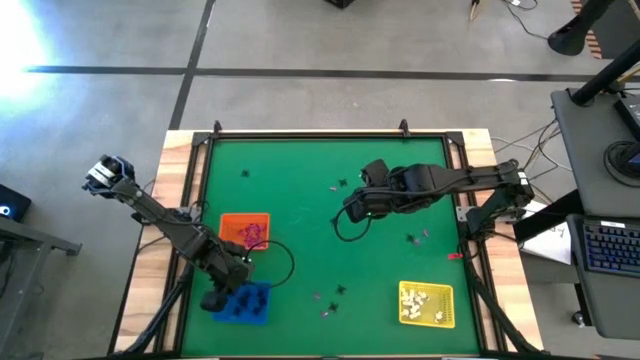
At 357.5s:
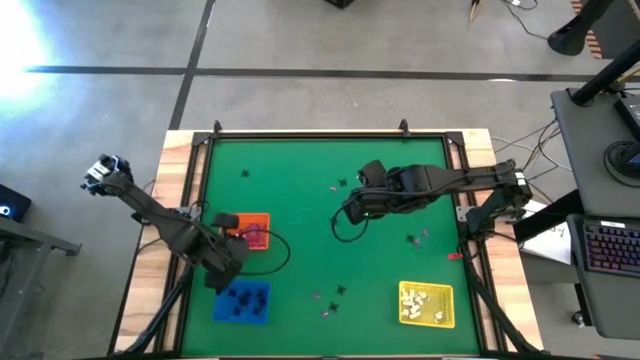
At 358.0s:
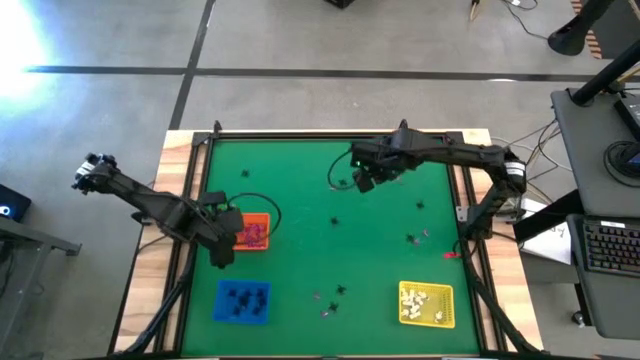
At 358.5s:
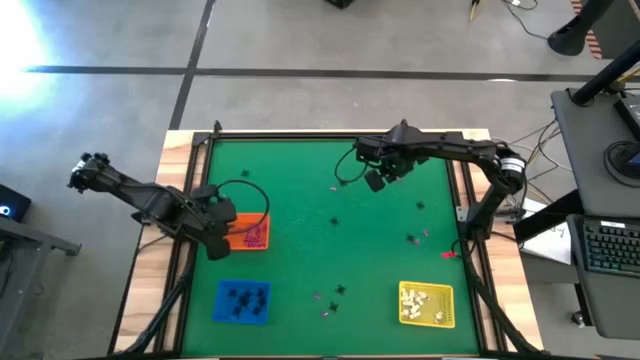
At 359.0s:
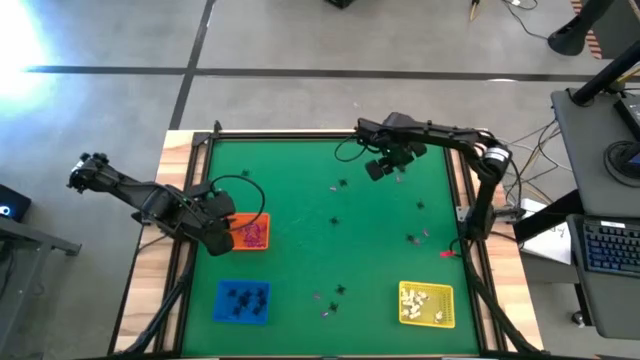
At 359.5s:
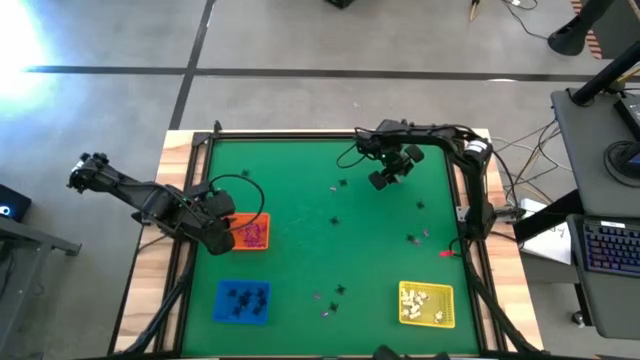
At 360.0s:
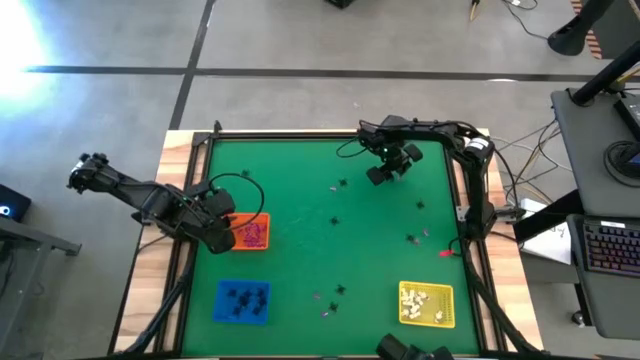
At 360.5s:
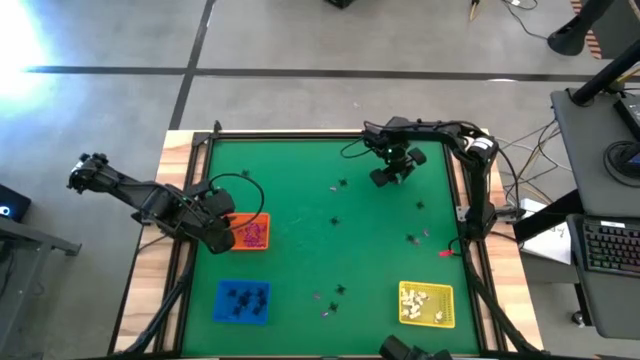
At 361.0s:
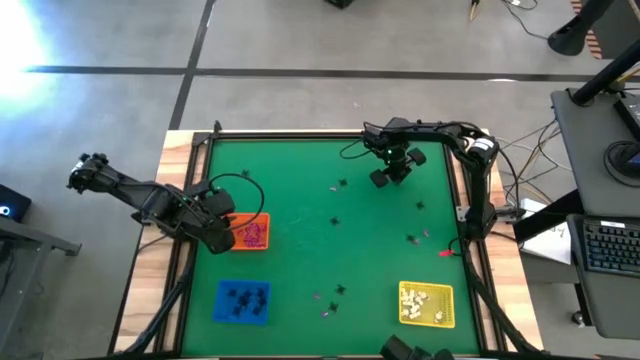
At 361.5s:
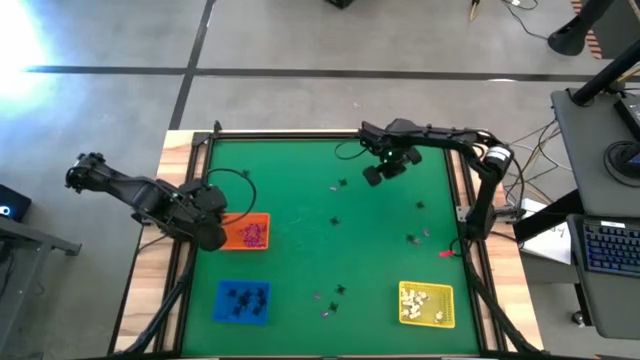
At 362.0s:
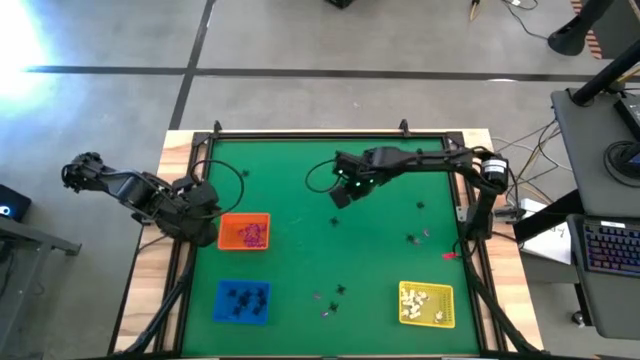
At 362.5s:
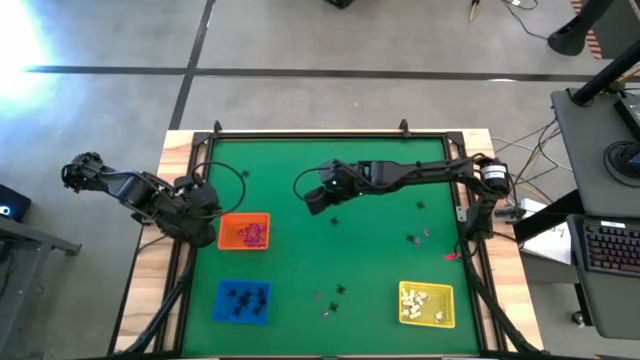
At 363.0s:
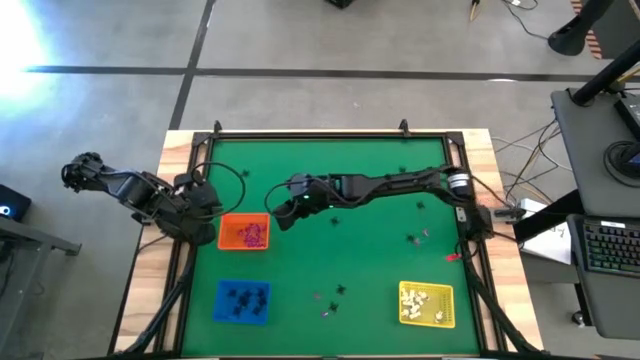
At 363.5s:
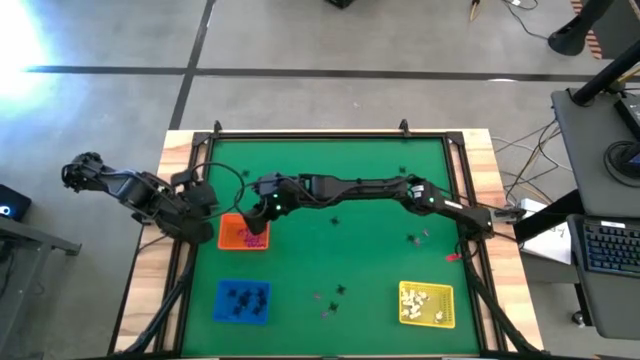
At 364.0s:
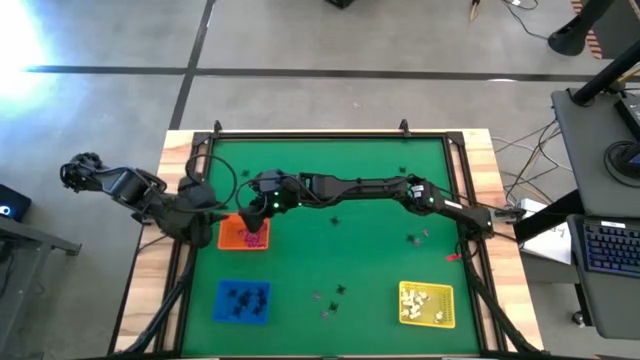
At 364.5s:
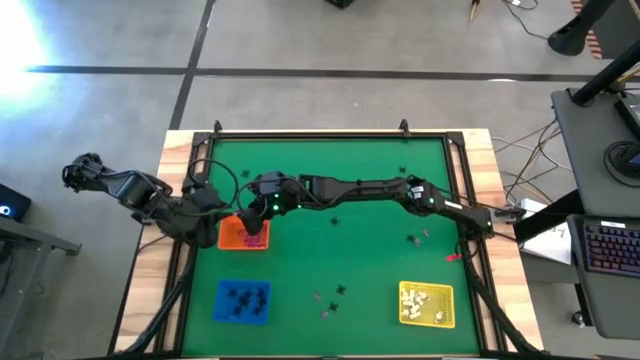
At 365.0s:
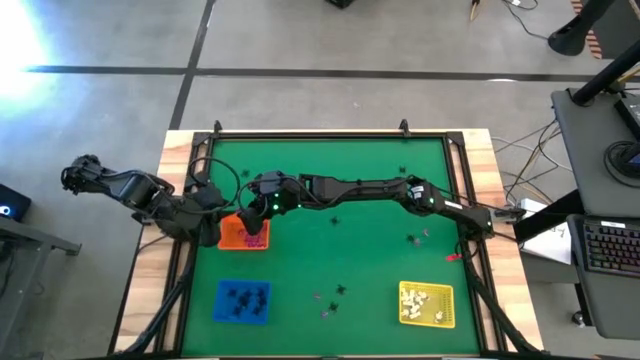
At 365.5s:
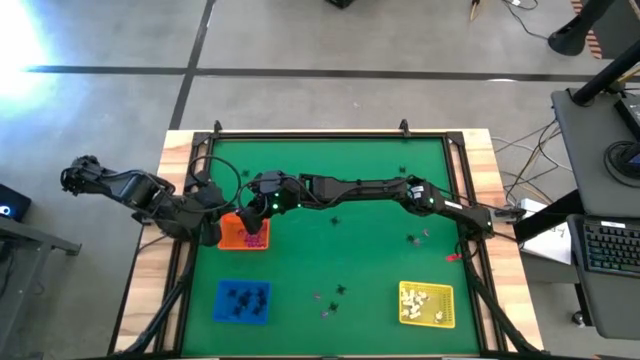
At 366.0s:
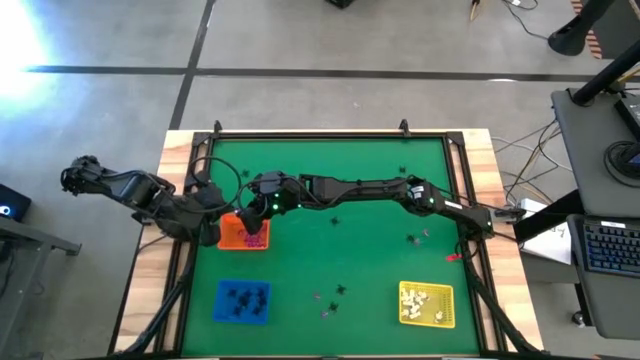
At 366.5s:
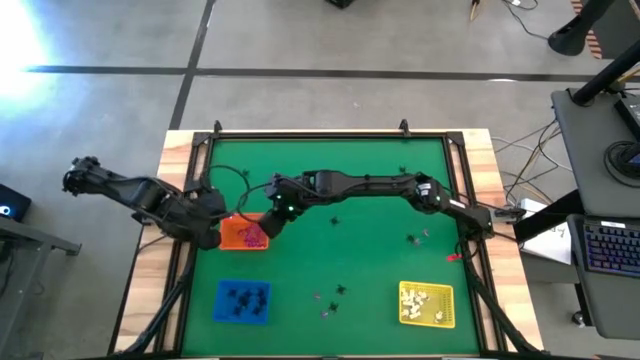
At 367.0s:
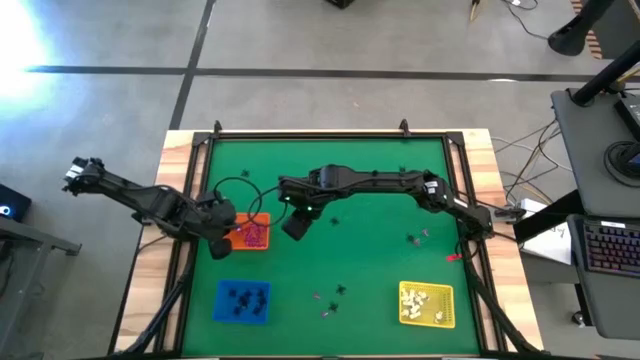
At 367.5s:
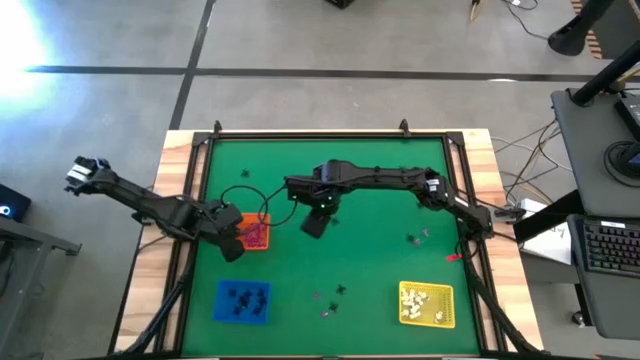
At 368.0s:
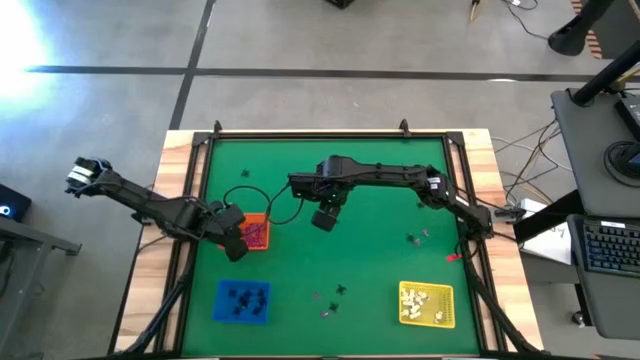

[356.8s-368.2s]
Task: Sort Halloween decoration
Put the violet witch hat toy into the orange bin

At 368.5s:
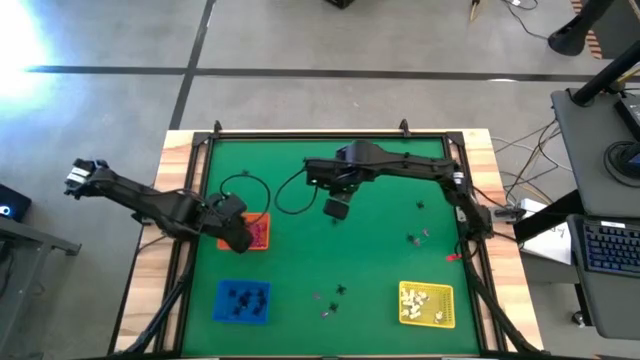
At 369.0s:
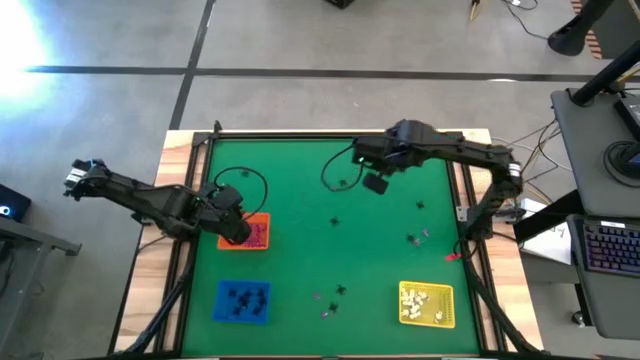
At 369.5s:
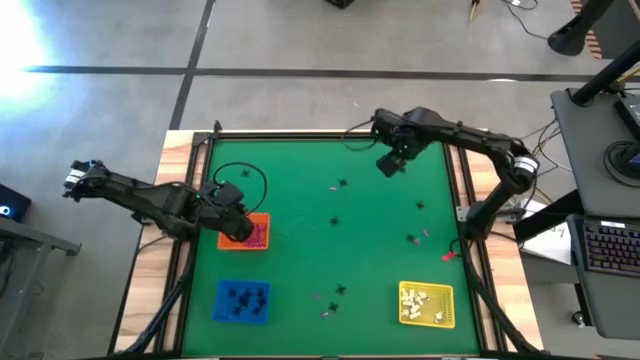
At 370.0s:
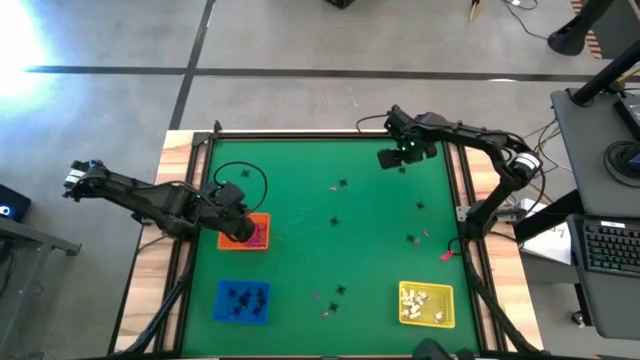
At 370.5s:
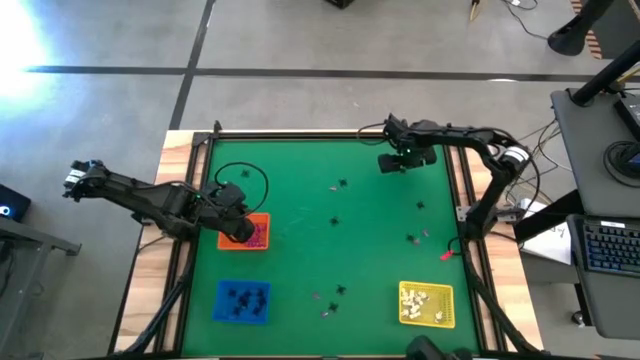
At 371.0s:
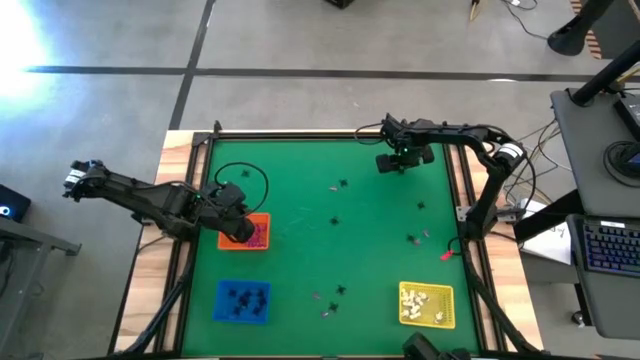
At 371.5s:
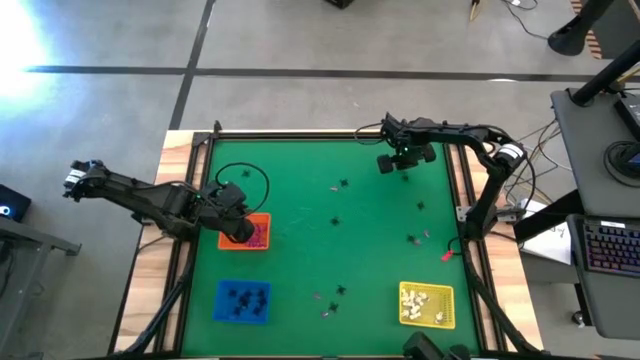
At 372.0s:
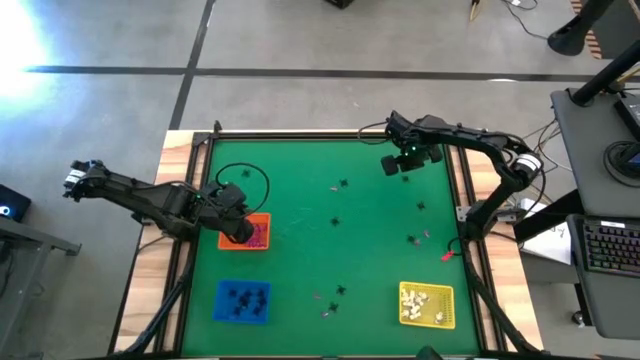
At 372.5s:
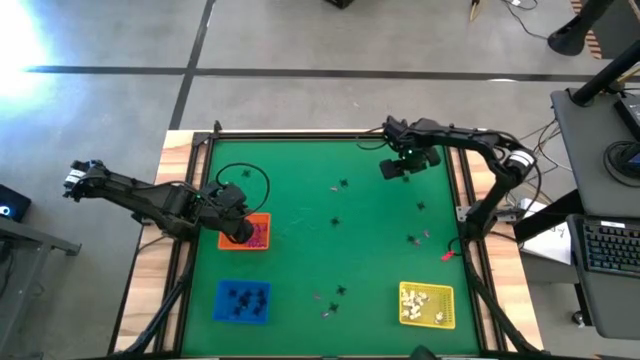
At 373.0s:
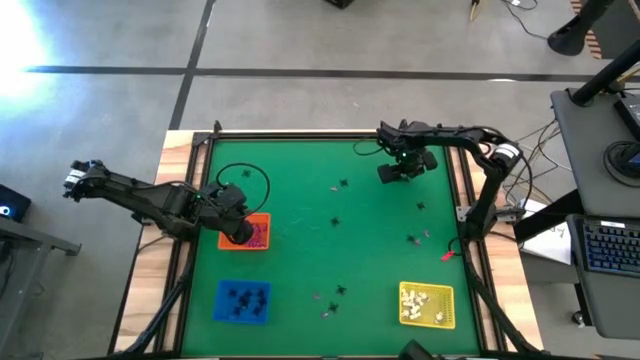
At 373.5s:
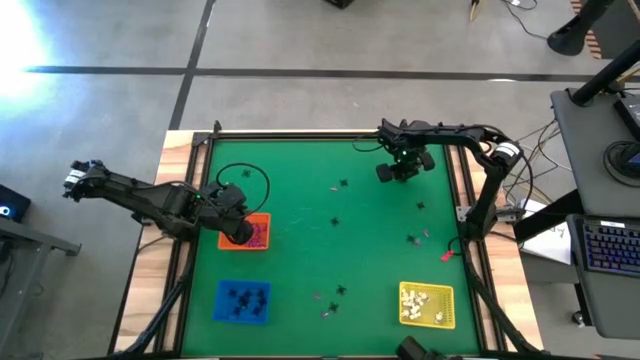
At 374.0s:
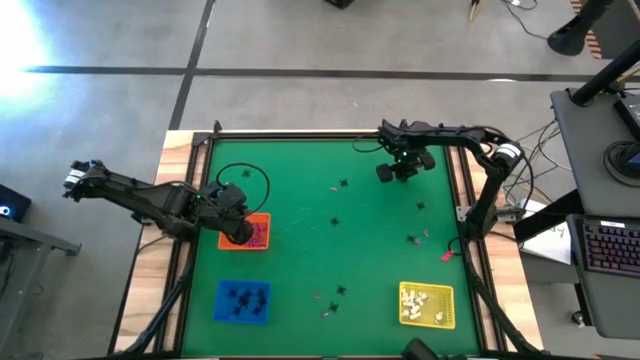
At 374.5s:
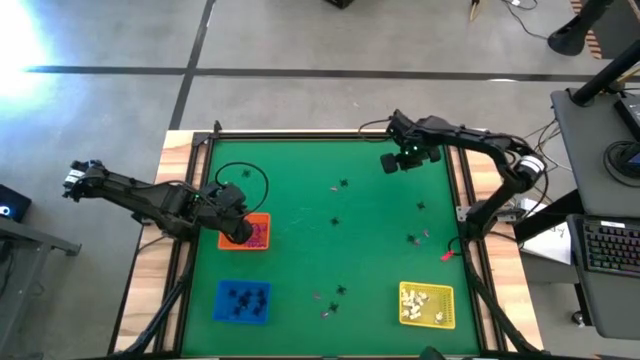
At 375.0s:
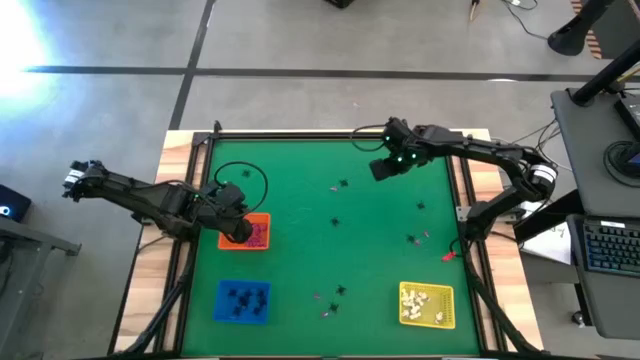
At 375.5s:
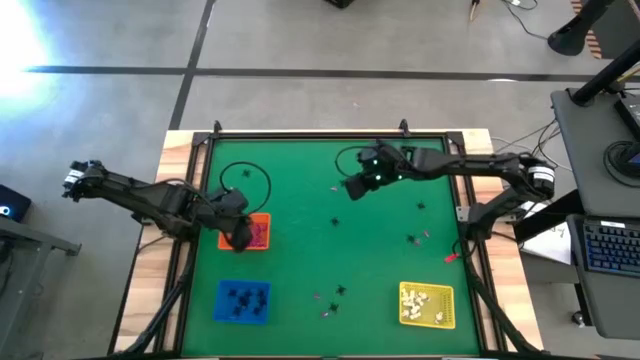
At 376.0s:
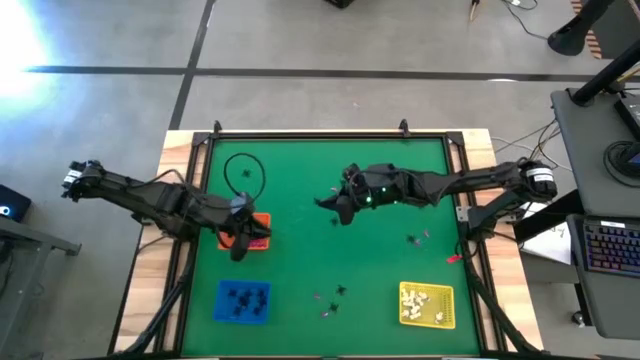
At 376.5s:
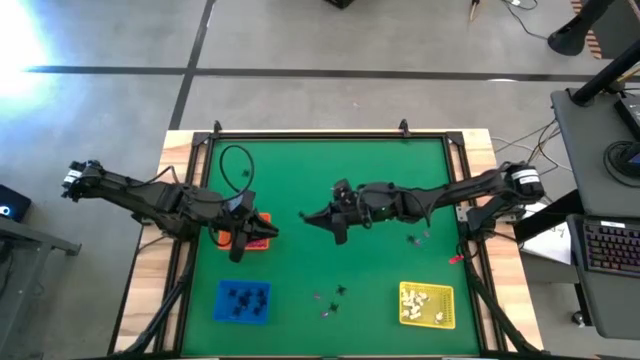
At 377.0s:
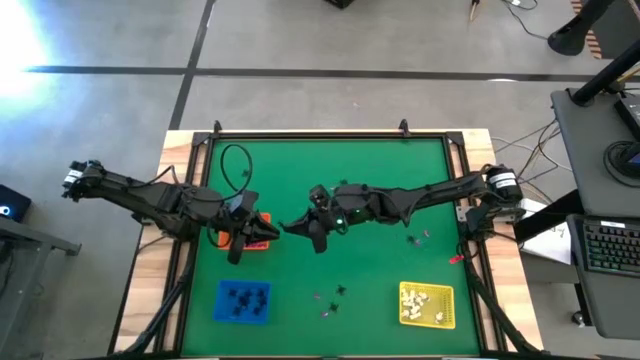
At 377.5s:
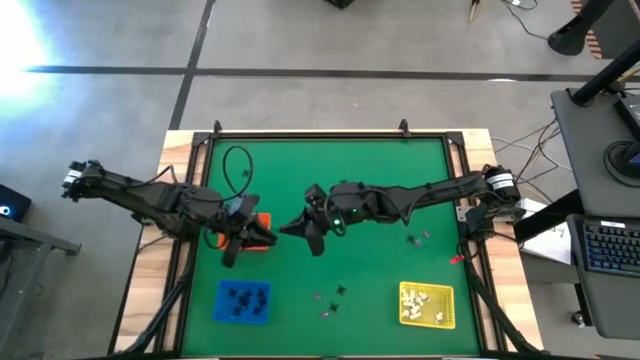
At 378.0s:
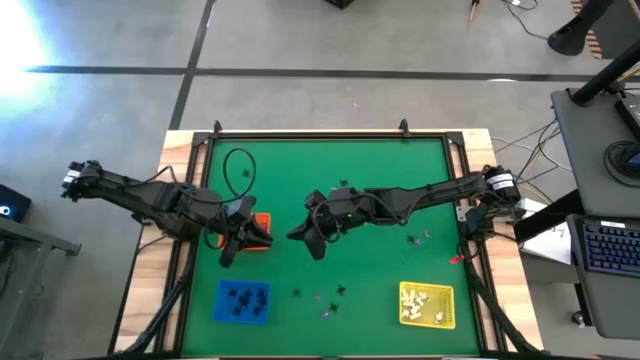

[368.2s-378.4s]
Put the black spider toy into the blue bin
